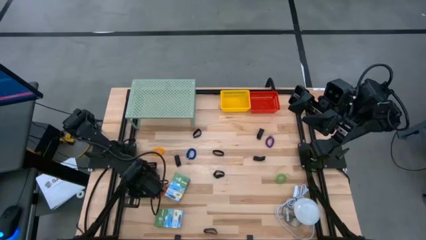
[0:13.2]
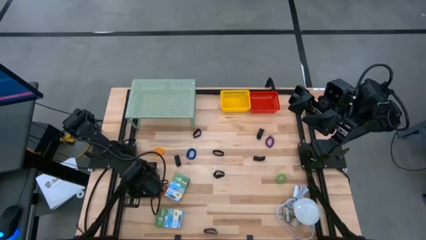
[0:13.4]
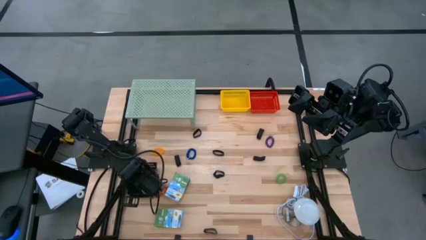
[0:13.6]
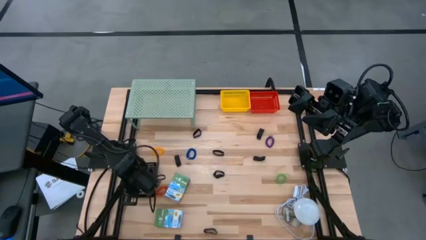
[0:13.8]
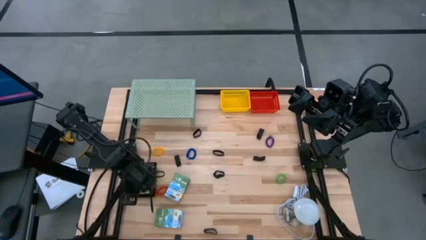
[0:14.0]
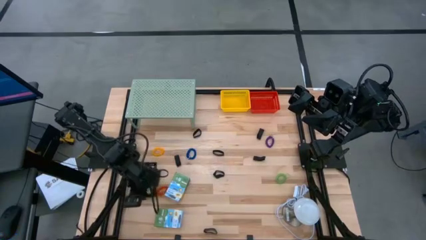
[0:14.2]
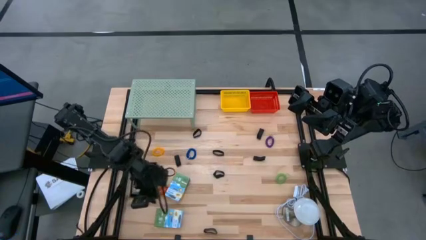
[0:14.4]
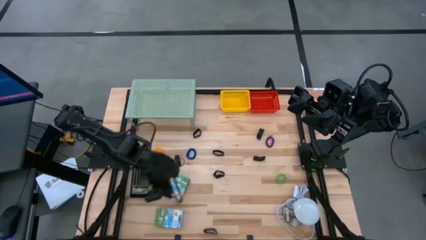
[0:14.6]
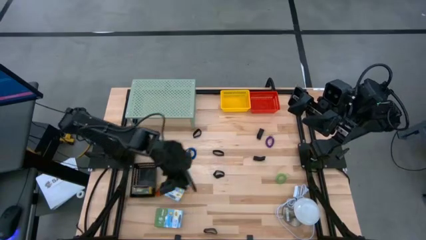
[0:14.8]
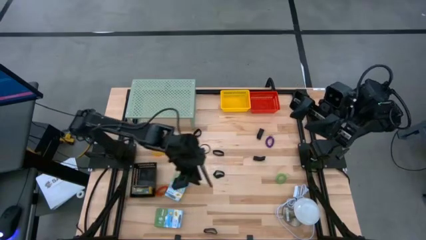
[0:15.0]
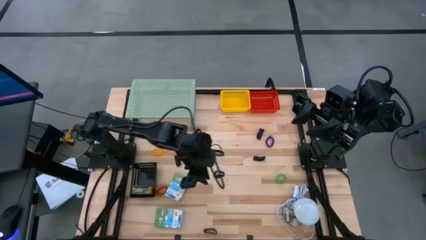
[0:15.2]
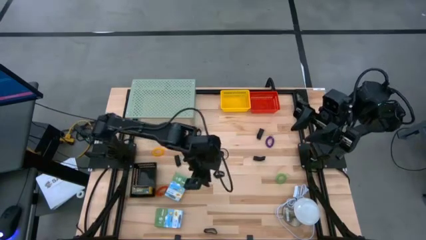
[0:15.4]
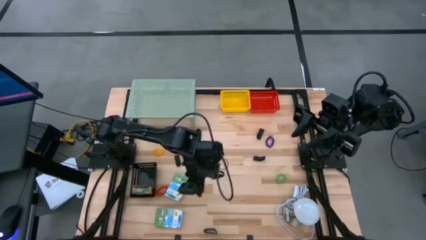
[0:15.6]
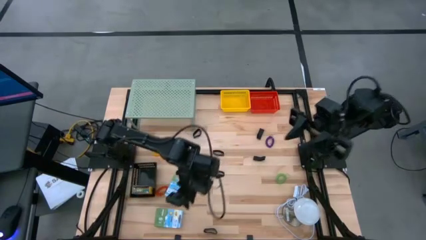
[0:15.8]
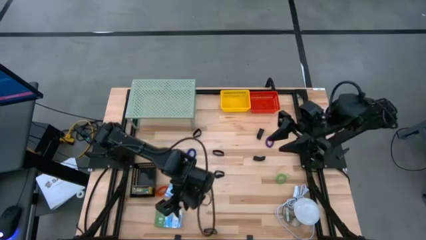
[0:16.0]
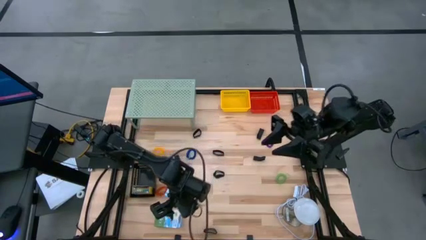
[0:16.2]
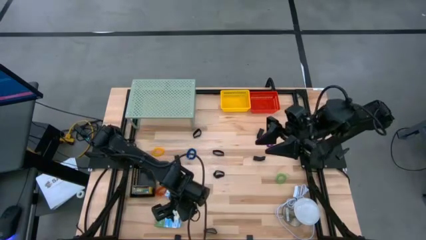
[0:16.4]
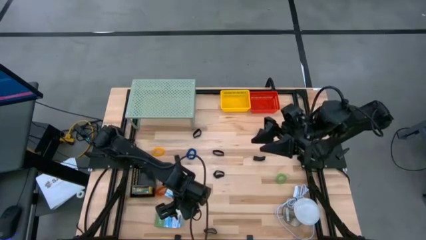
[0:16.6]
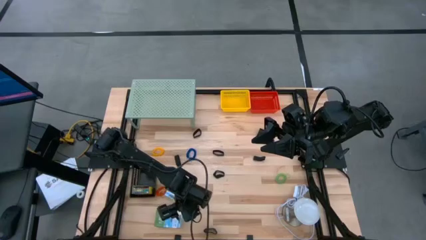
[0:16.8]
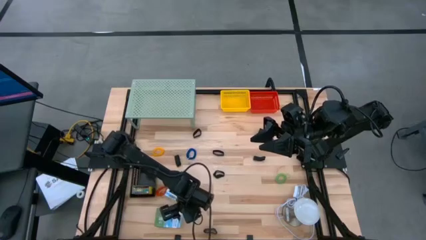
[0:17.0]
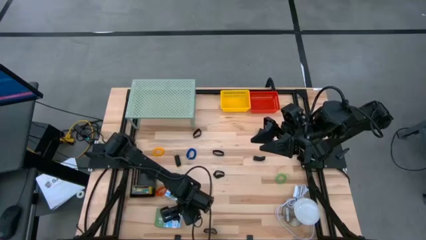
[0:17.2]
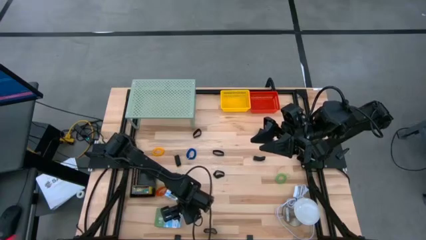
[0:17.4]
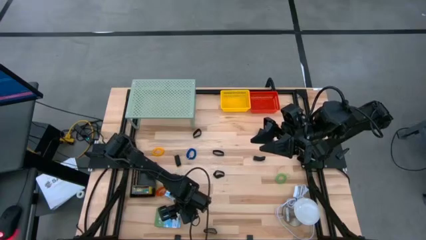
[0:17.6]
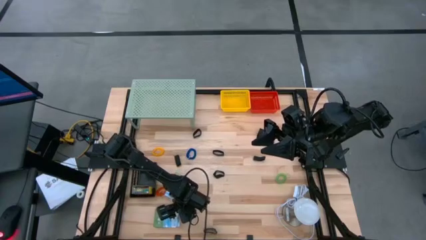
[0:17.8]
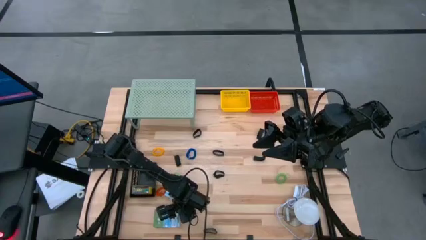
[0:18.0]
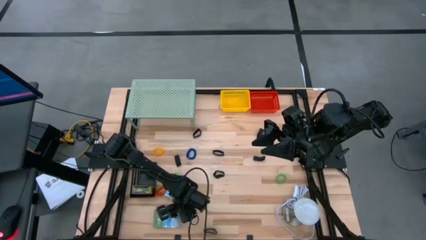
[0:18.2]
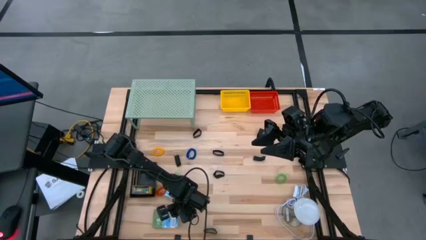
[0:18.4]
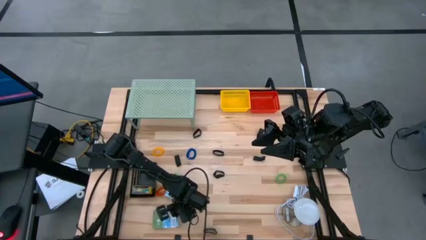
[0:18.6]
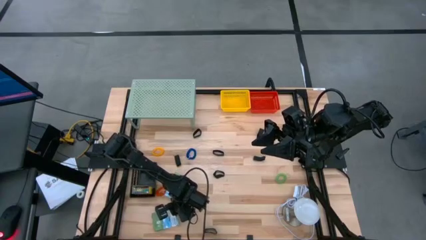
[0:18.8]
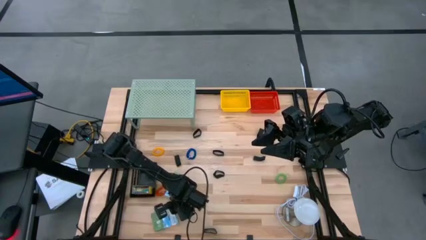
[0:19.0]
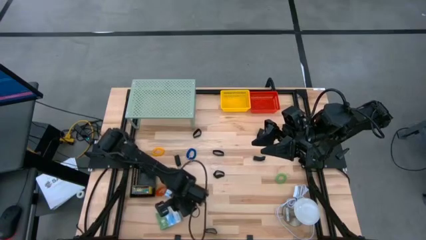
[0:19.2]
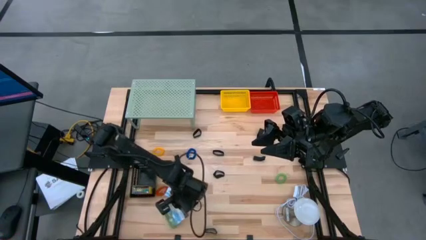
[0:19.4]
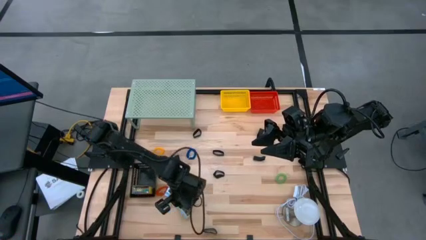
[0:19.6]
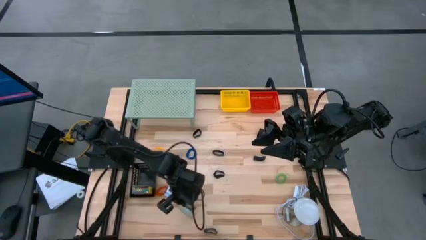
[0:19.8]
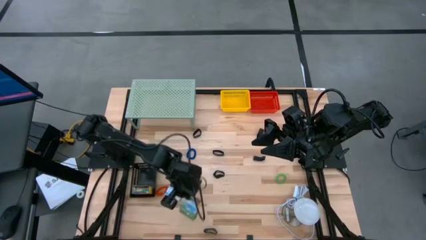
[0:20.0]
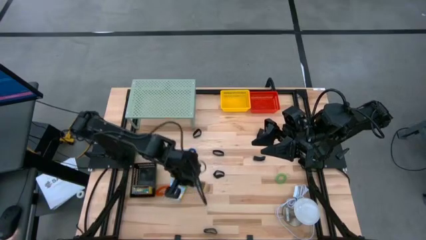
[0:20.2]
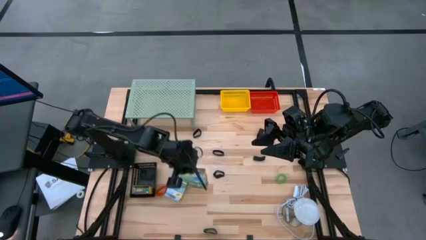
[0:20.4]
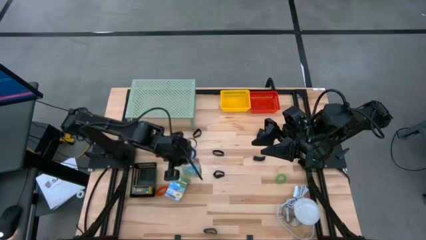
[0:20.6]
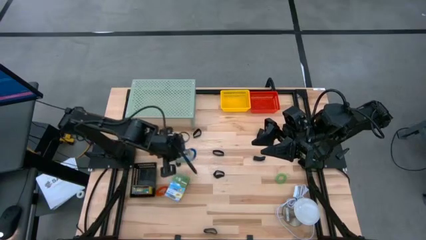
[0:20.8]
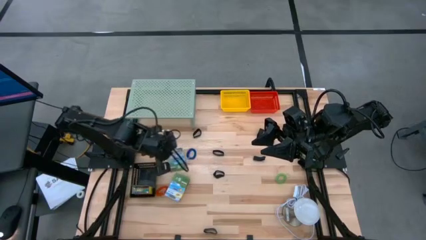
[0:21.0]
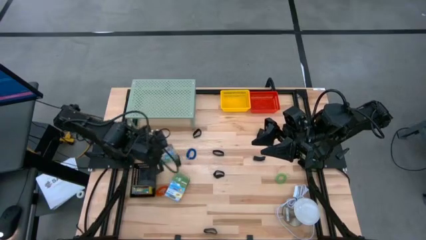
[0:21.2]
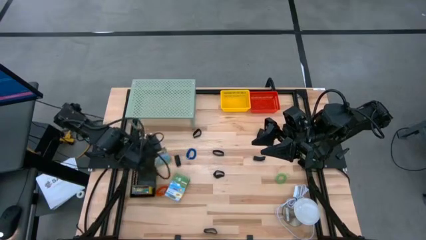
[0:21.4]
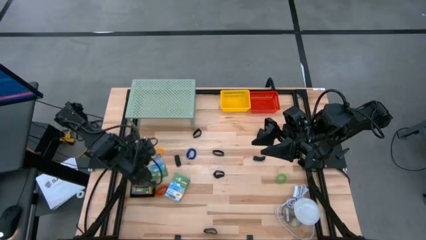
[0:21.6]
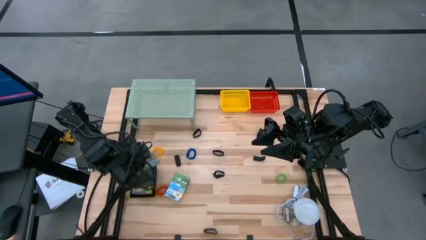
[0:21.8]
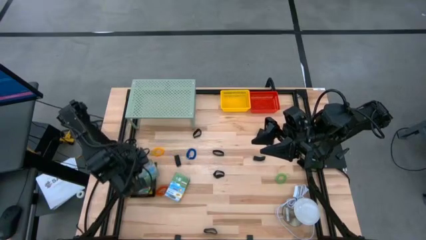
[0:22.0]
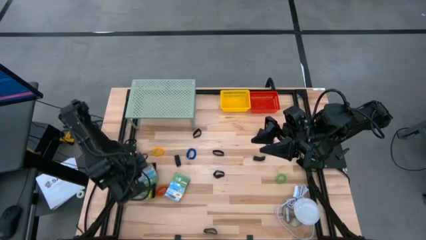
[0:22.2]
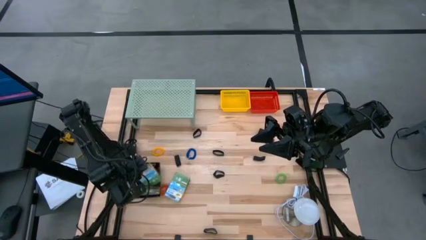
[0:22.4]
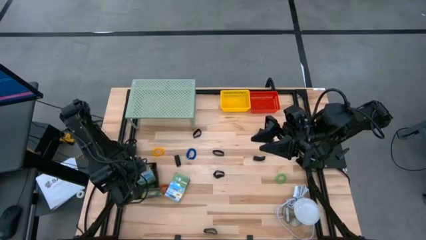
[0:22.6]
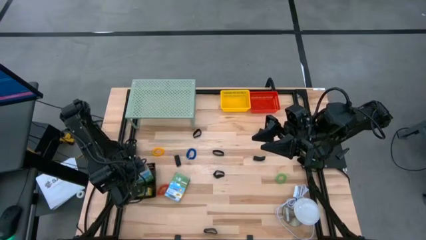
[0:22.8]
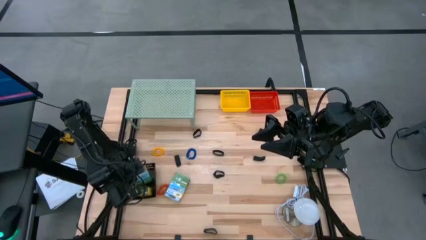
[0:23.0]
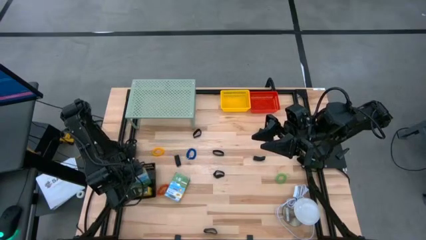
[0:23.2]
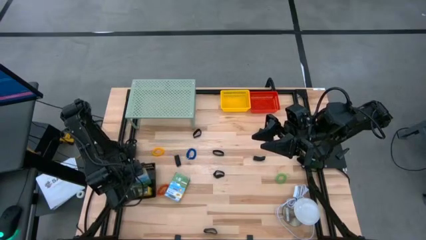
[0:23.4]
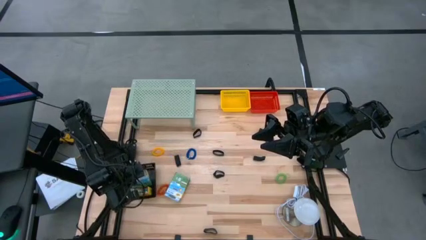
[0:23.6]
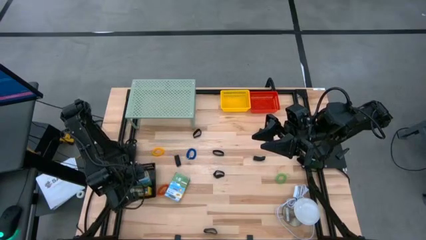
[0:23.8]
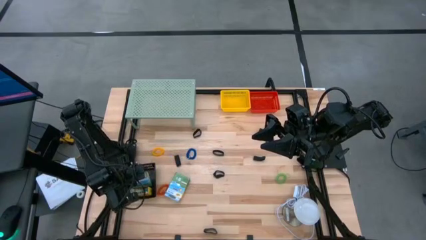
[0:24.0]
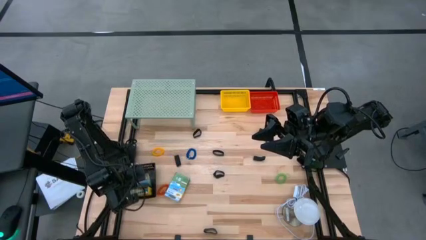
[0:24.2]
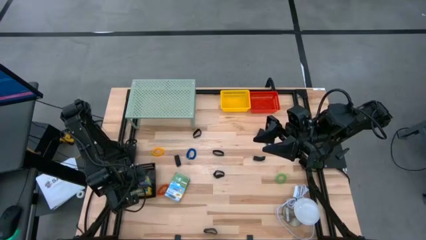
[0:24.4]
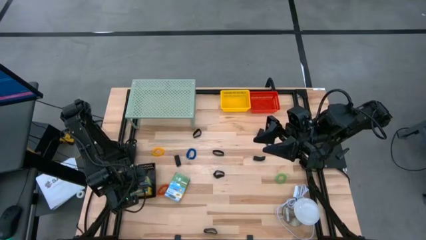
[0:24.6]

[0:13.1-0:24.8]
Task: Pick & Place Office Desk Supplies
Put the yellow crayon box into the black basket

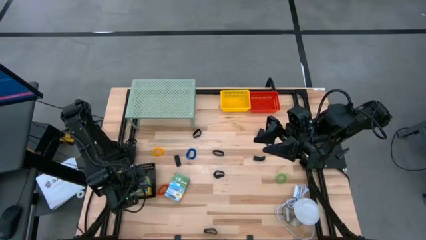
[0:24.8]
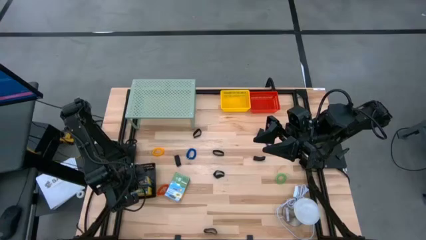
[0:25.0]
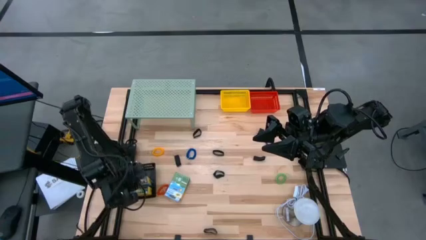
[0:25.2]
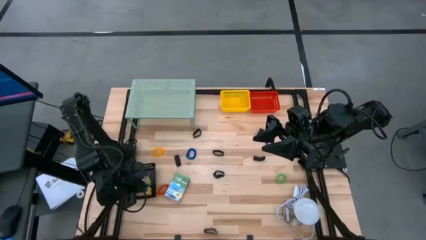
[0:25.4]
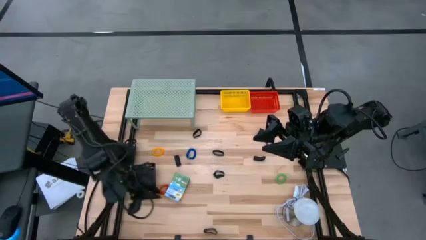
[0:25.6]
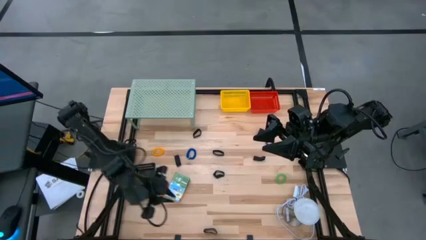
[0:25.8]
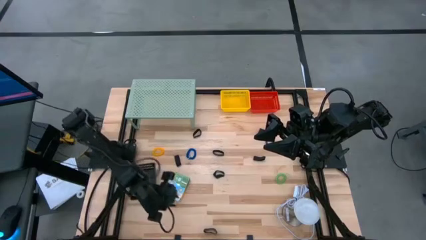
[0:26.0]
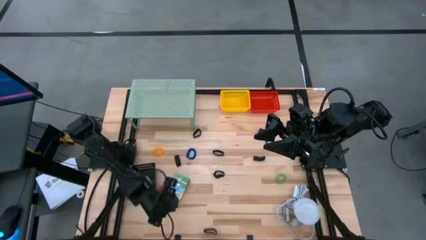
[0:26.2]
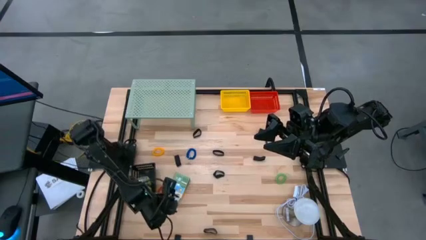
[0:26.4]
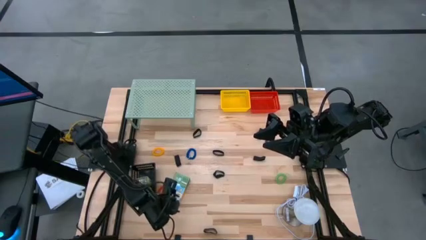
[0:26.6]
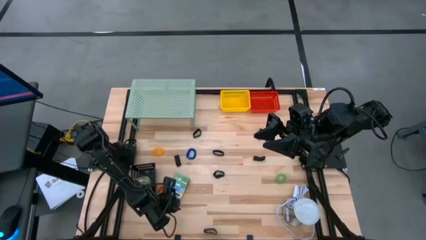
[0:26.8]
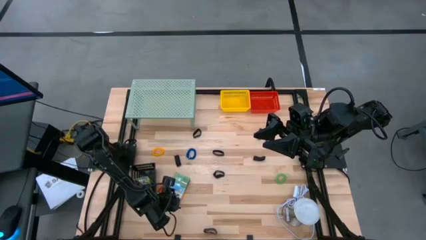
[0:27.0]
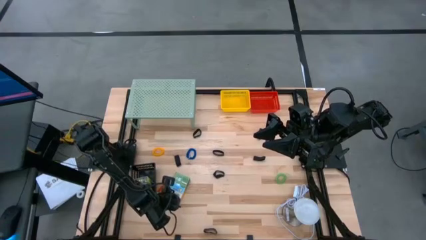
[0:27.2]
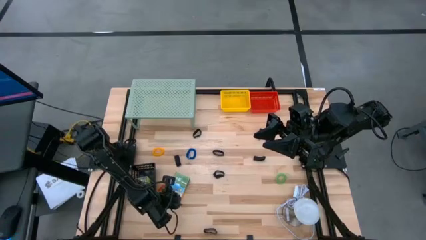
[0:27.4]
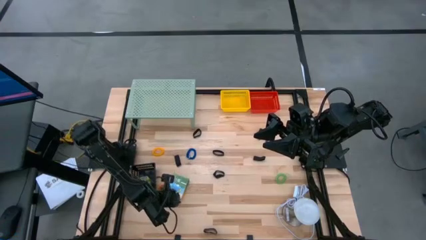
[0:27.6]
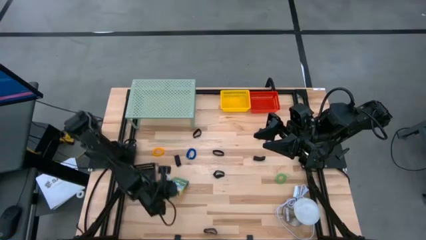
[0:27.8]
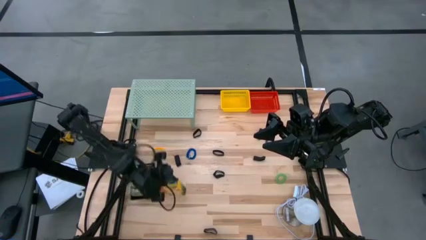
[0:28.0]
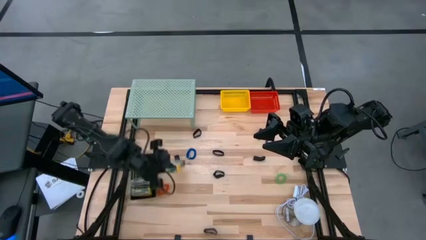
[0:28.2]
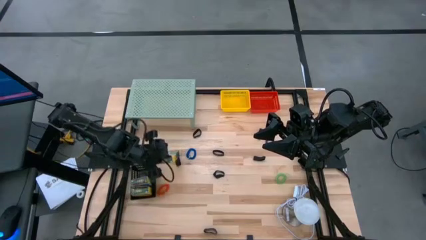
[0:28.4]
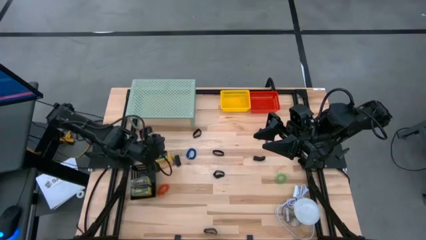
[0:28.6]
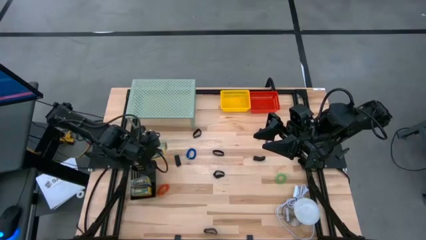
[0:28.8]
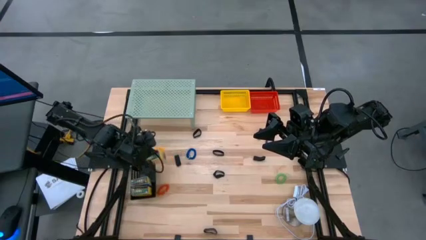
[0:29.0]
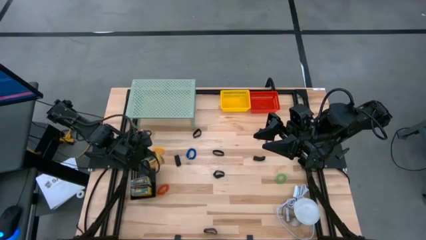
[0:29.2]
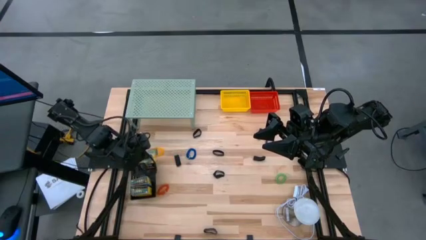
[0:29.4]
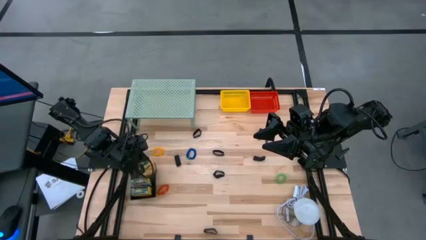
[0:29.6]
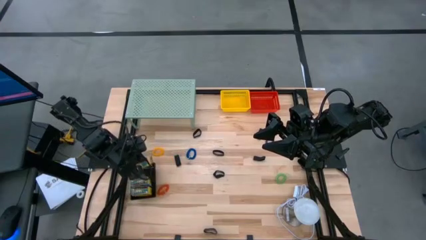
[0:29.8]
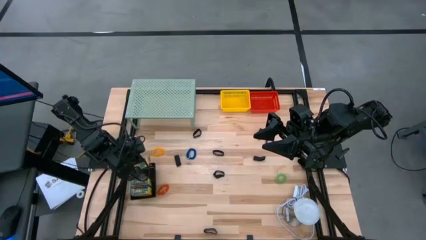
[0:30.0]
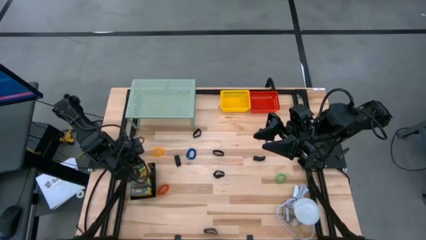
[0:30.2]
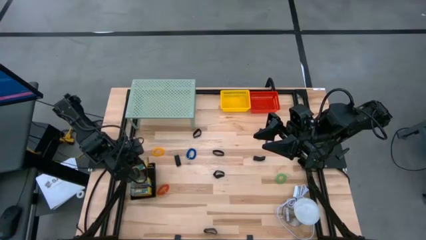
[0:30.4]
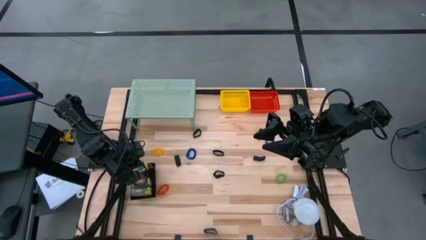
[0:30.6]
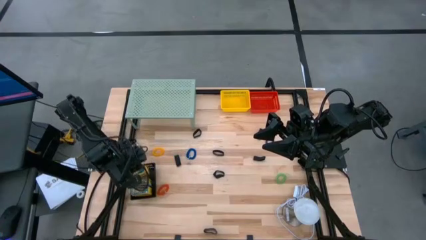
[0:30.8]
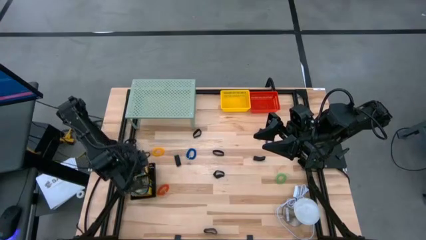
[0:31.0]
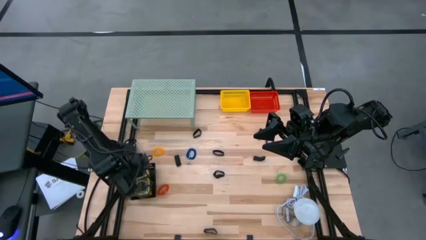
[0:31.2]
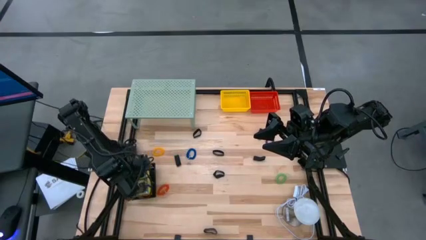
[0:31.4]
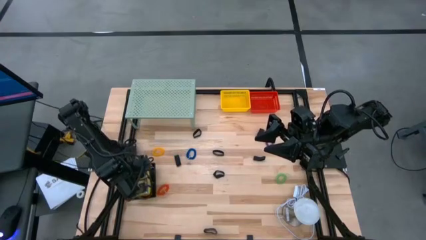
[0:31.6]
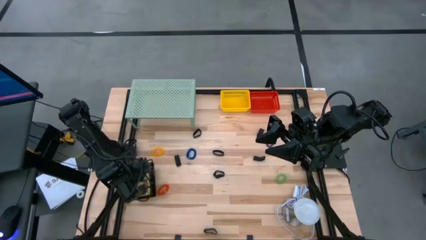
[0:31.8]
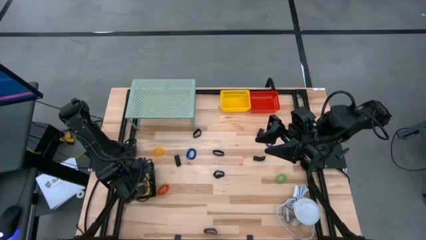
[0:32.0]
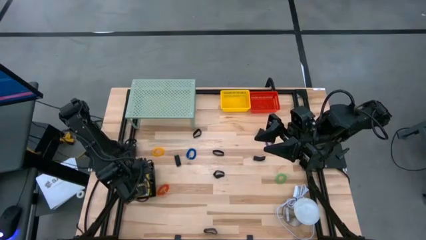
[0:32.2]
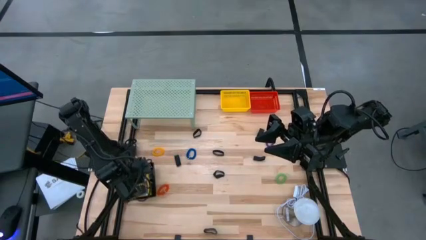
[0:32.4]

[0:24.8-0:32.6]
Put the yellow crayon box into the black basket
